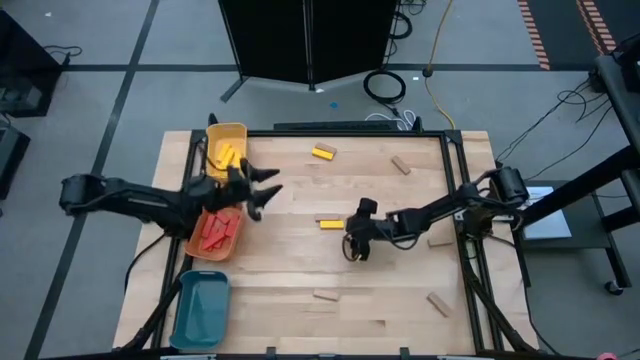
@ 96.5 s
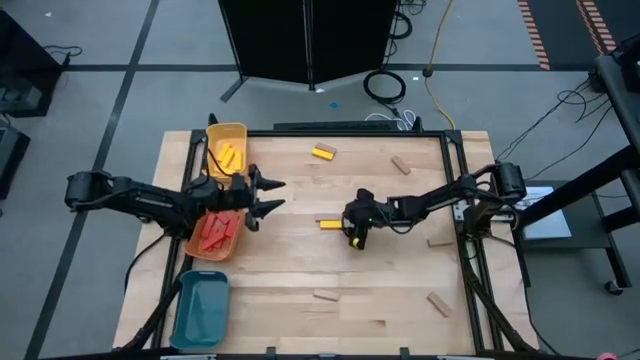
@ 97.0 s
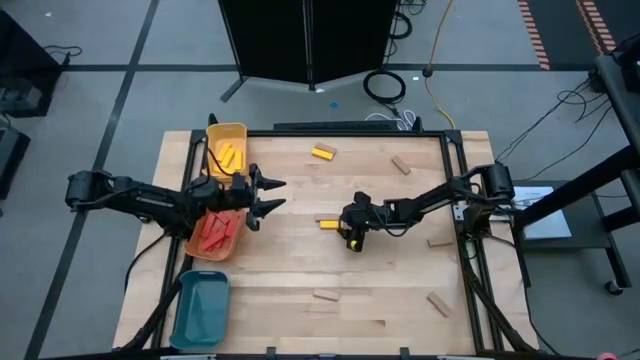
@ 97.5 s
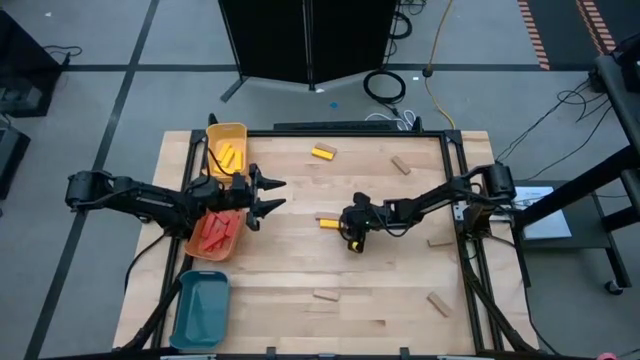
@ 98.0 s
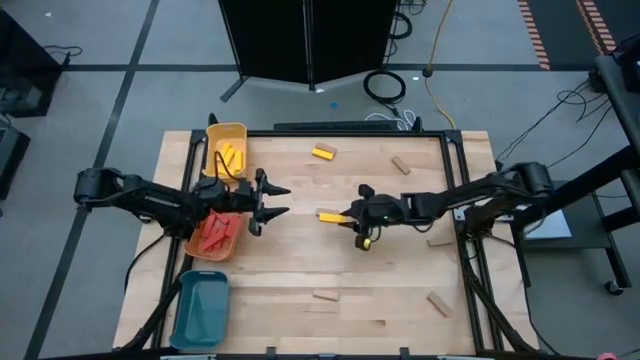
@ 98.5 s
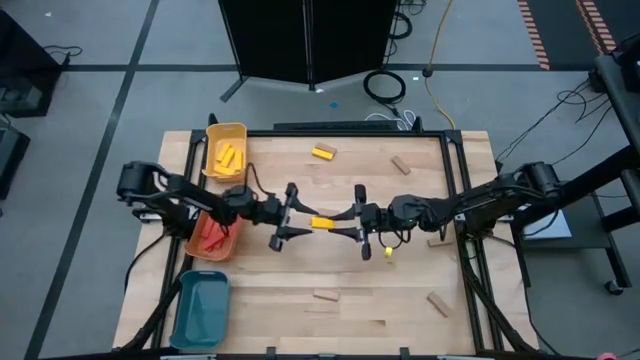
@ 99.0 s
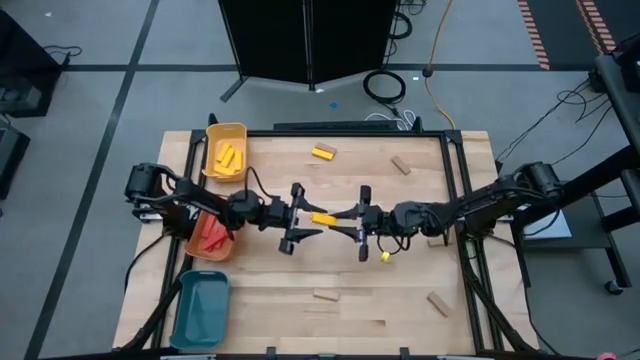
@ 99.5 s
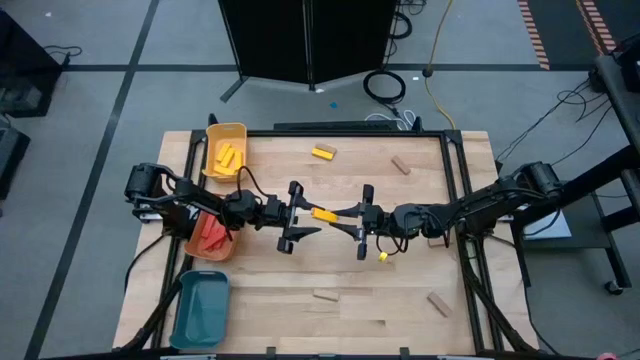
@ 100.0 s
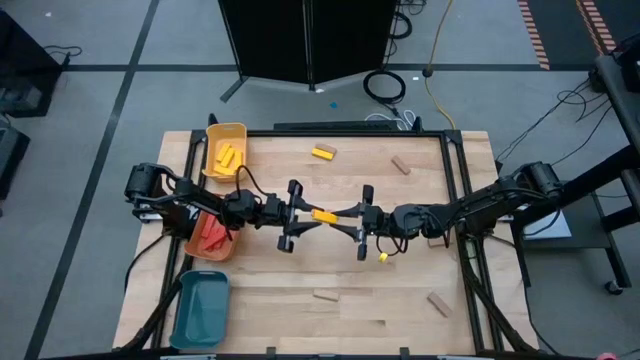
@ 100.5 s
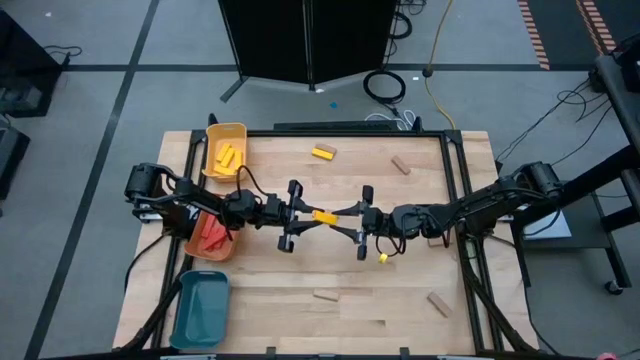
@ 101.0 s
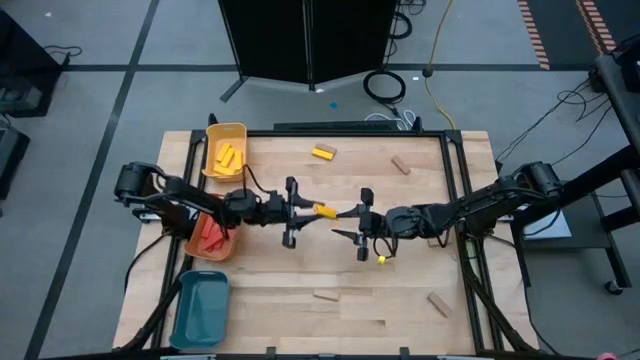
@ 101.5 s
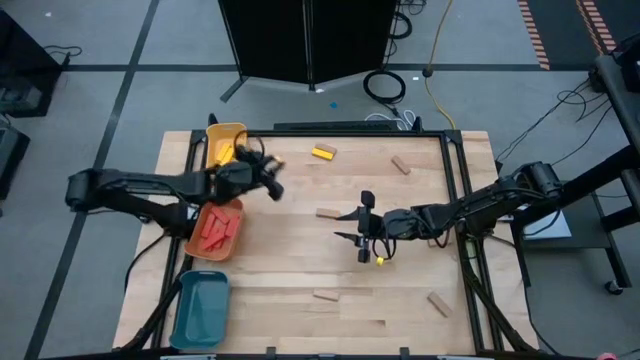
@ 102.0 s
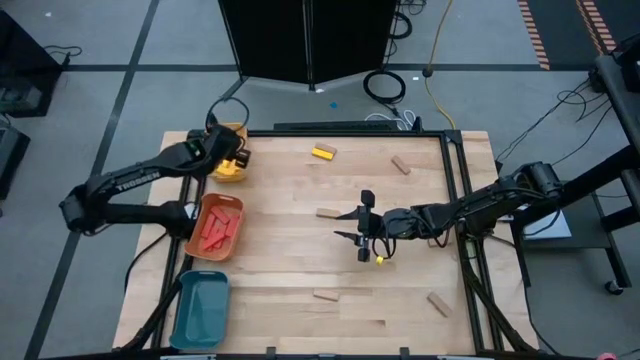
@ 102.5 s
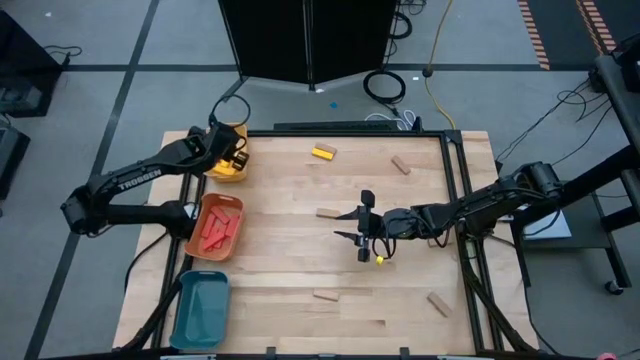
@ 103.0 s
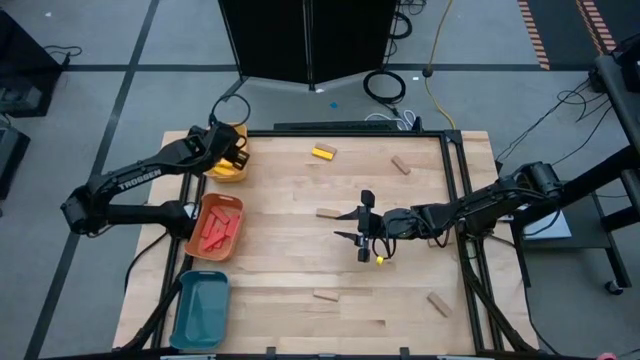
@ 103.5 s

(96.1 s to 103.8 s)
Task: Sort blocks
Put the center yellow block in the yellow bin

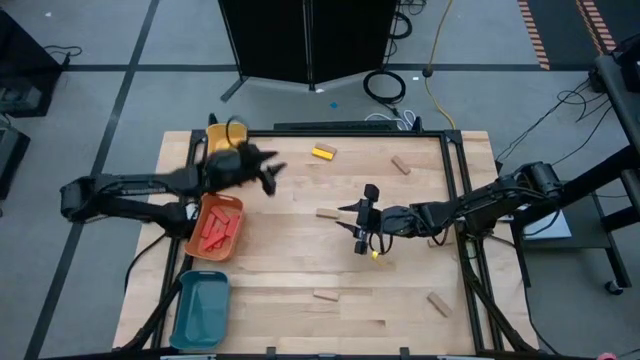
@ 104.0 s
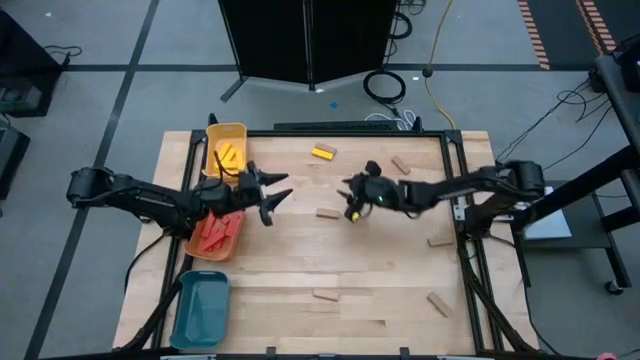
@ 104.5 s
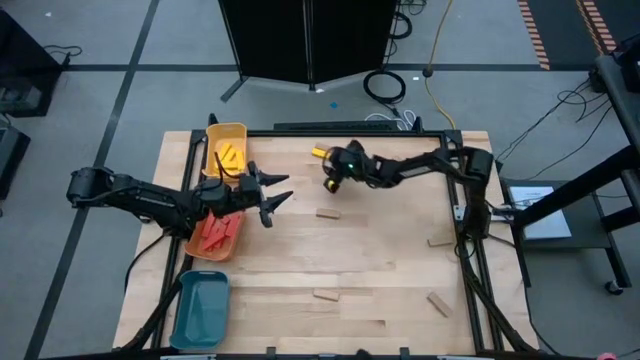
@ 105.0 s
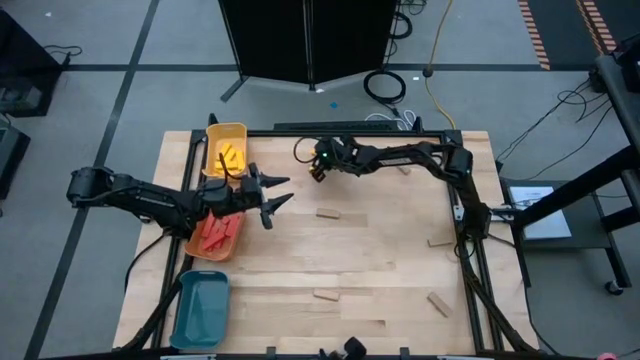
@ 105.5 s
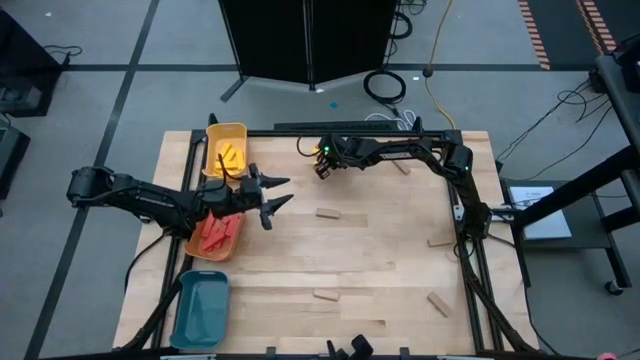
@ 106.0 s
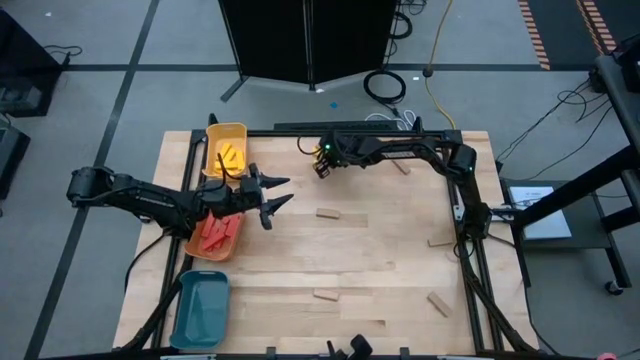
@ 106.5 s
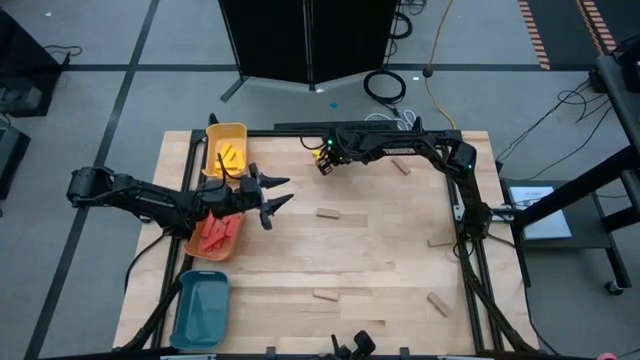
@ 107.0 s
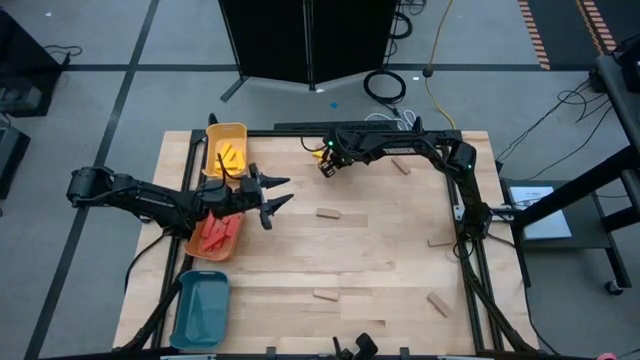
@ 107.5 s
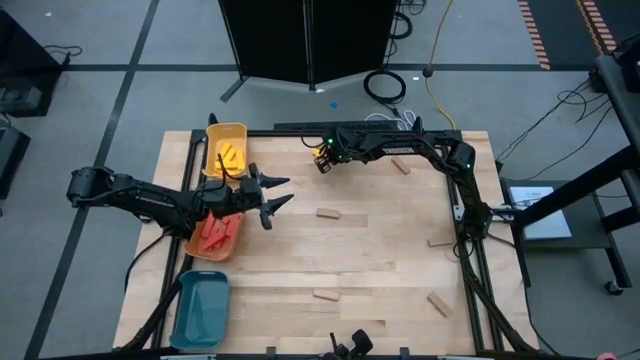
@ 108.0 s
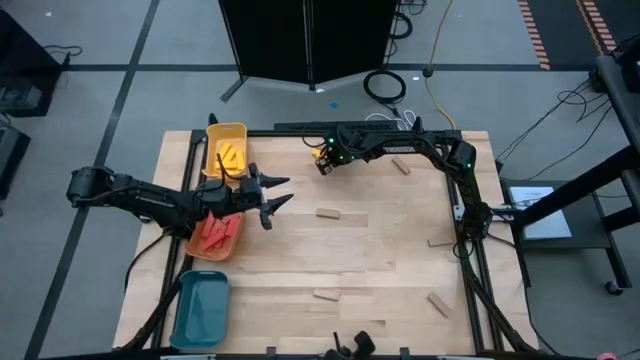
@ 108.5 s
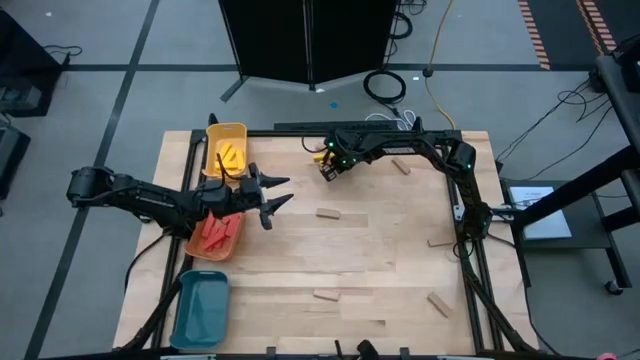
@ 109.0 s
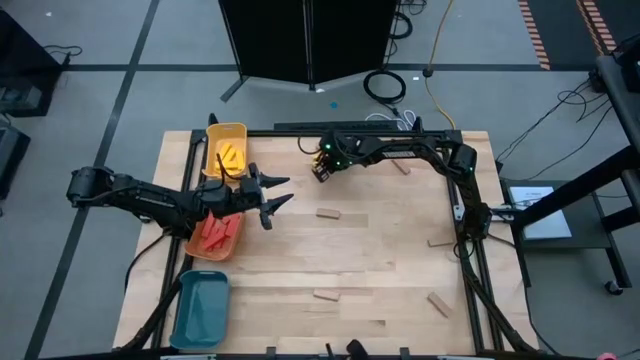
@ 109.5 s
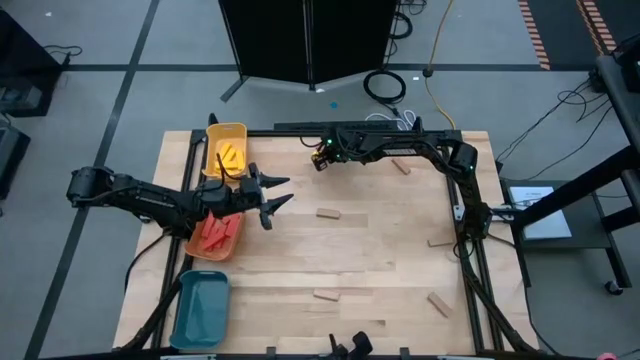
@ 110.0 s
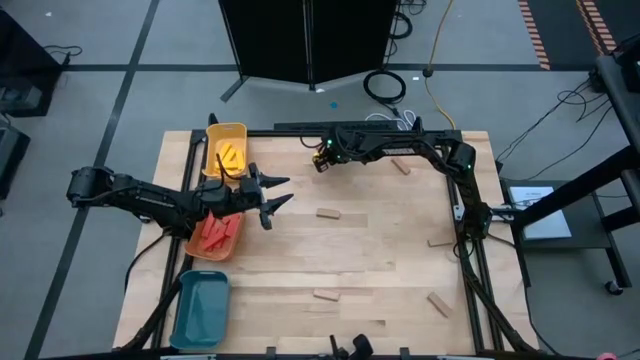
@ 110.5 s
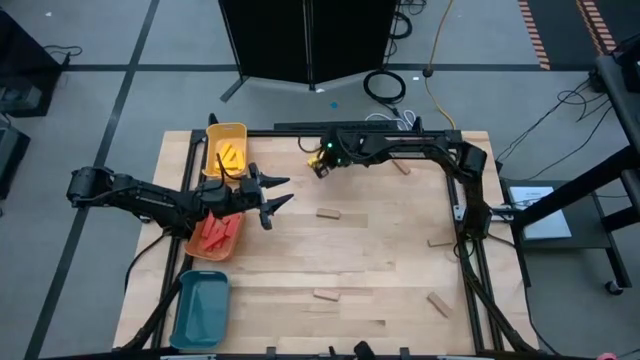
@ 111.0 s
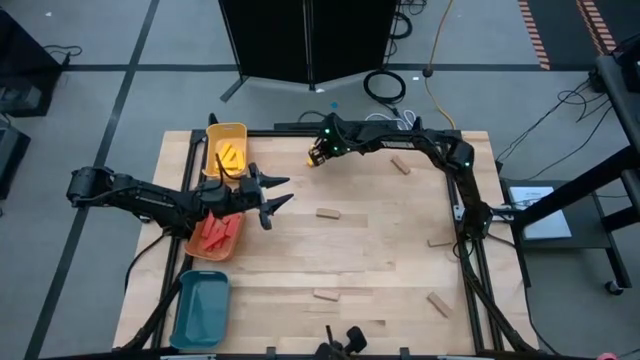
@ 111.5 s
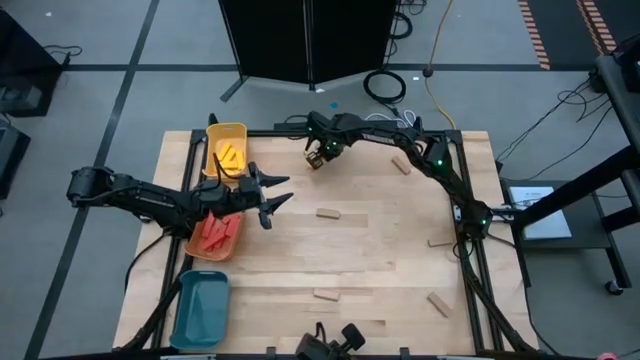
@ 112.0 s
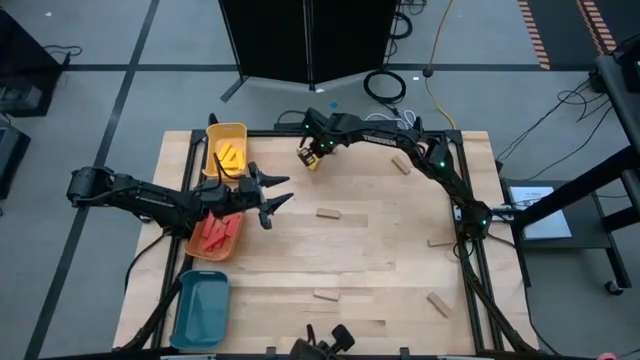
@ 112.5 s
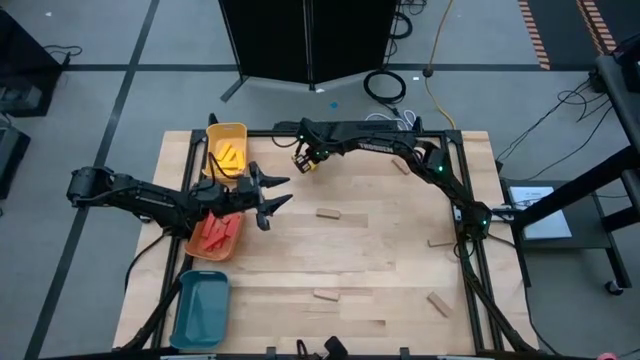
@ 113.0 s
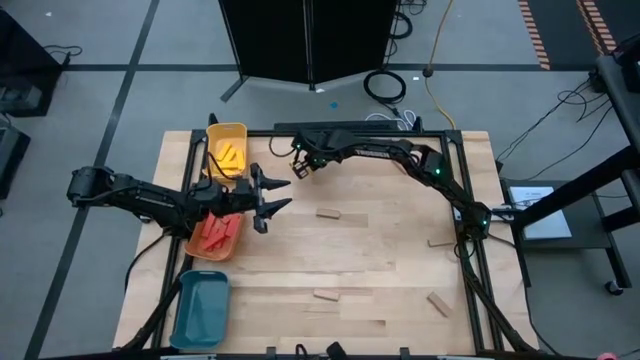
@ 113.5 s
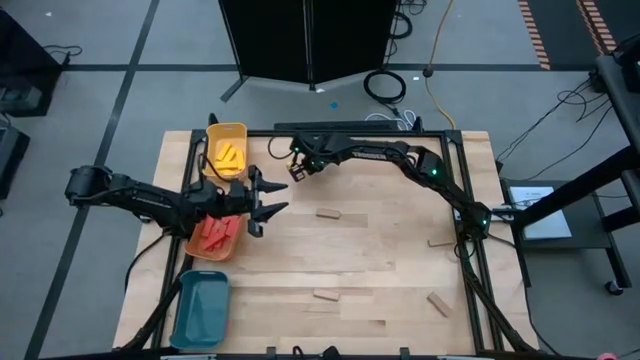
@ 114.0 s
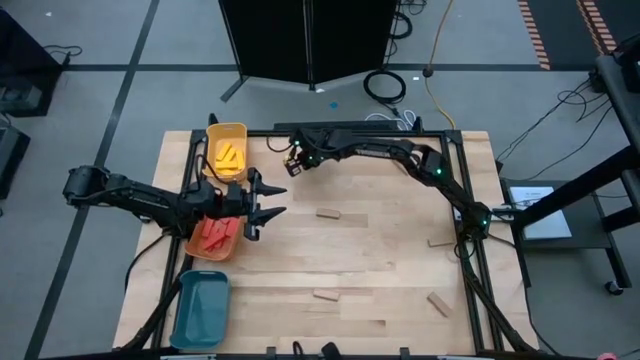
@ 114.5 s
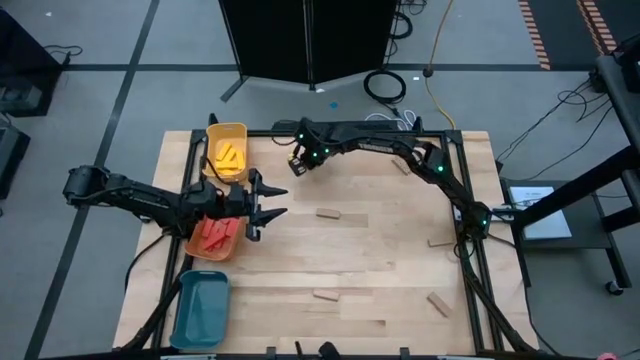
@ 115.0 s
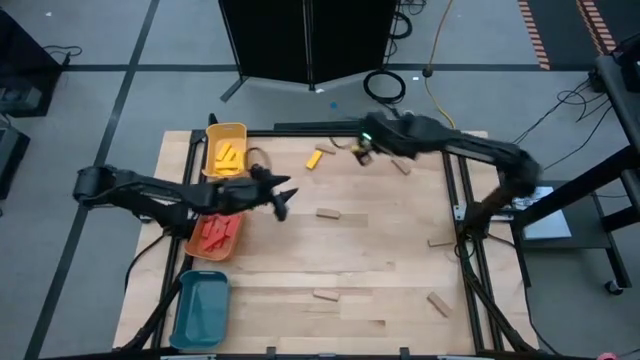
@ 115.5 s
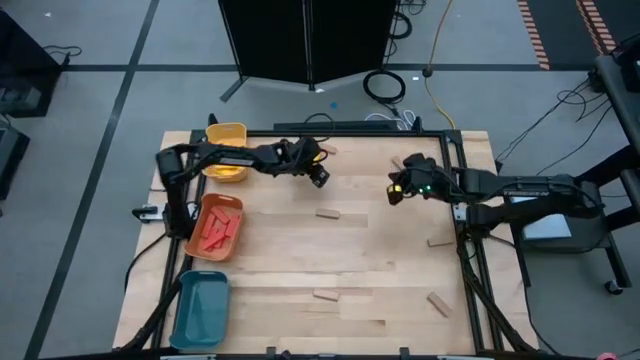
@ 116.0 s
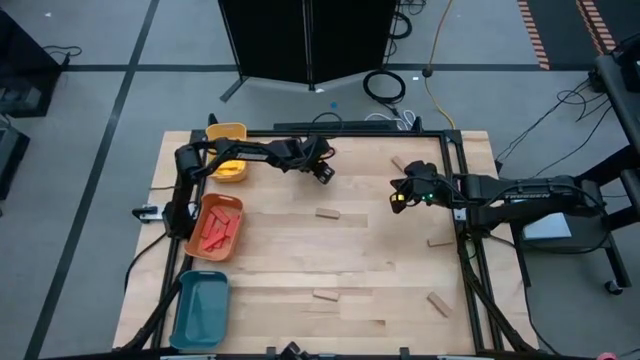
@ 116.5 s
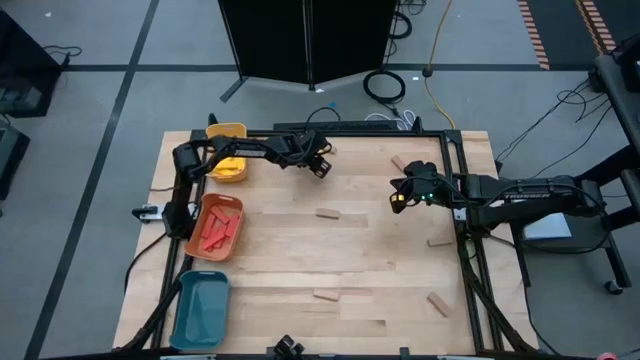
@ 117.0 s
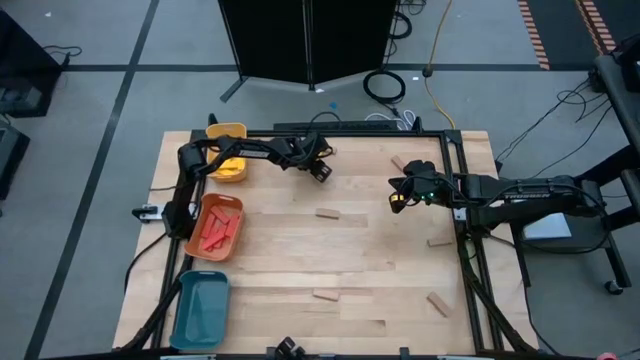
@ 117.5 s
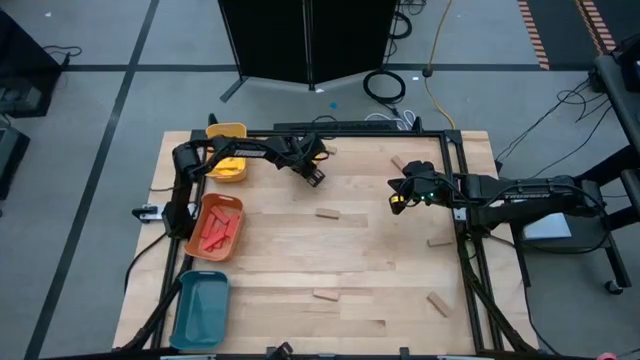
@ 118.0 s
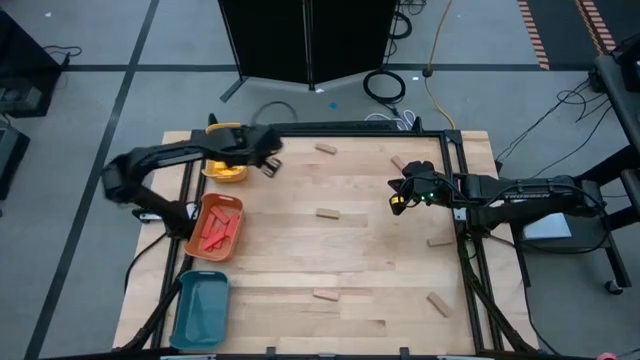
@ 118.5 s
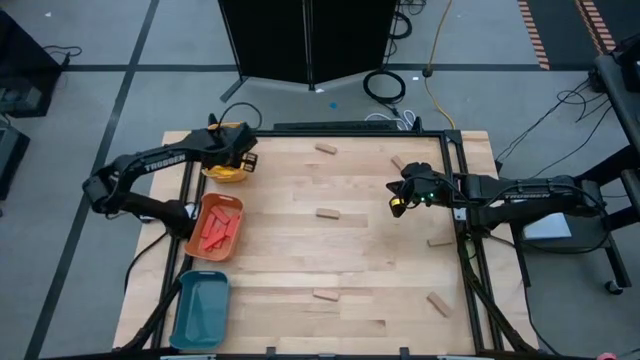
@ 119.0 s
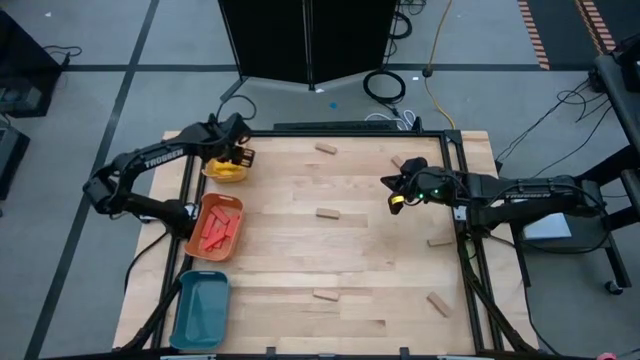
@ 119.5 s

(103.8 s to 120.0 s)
Put the yellow block in the yellow bin
